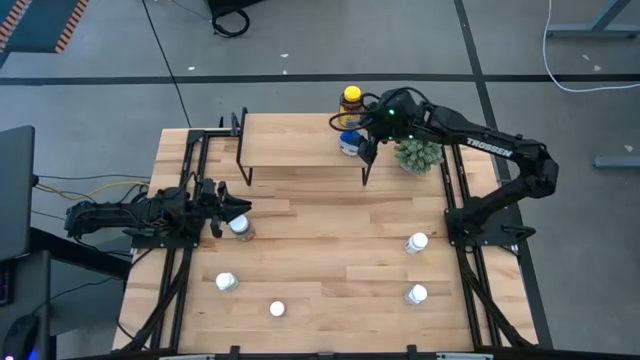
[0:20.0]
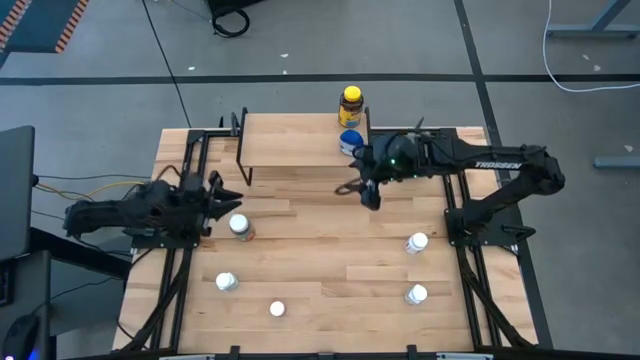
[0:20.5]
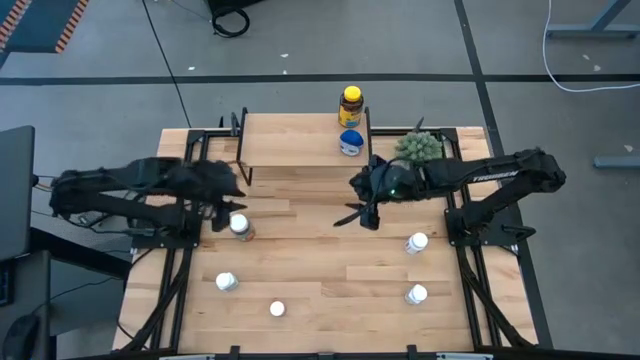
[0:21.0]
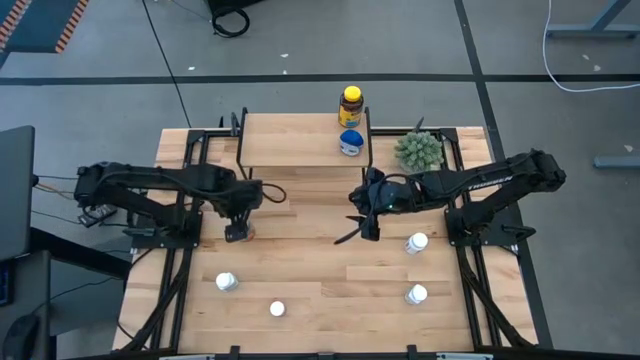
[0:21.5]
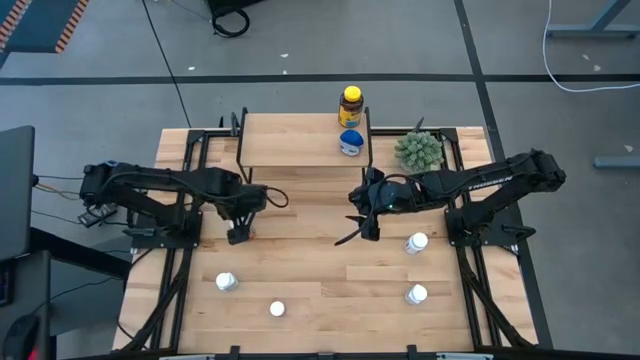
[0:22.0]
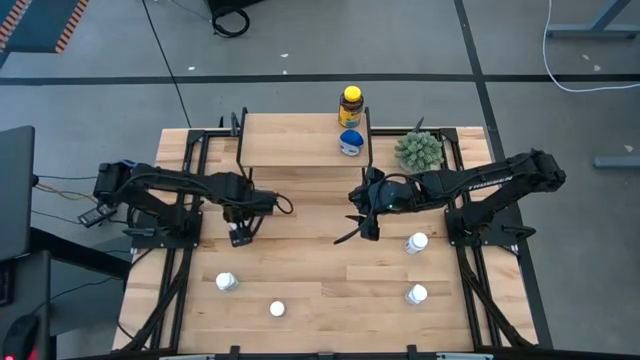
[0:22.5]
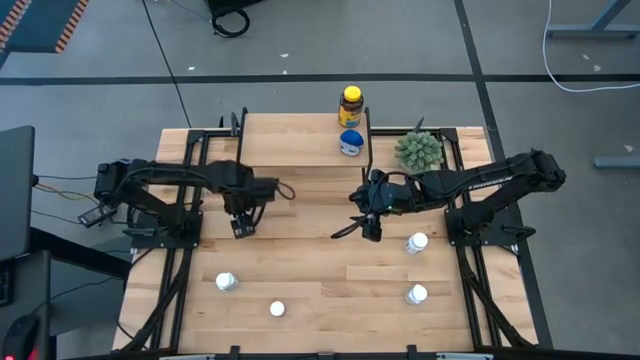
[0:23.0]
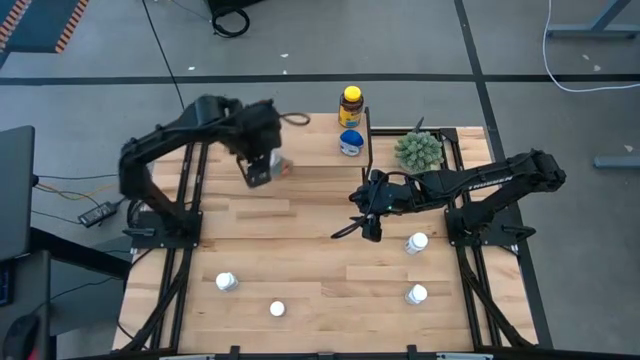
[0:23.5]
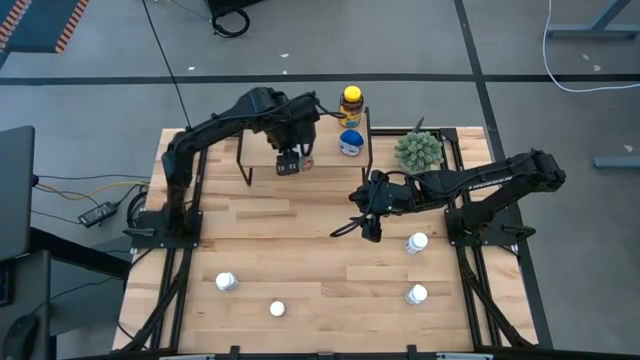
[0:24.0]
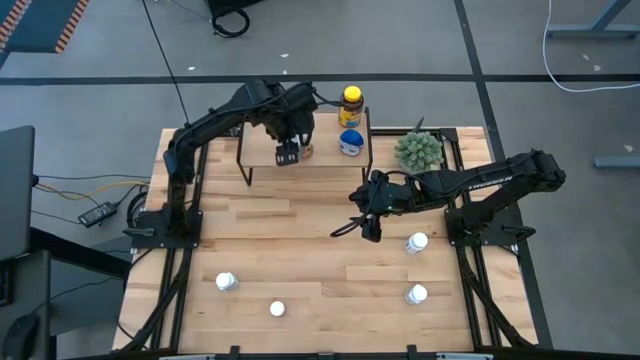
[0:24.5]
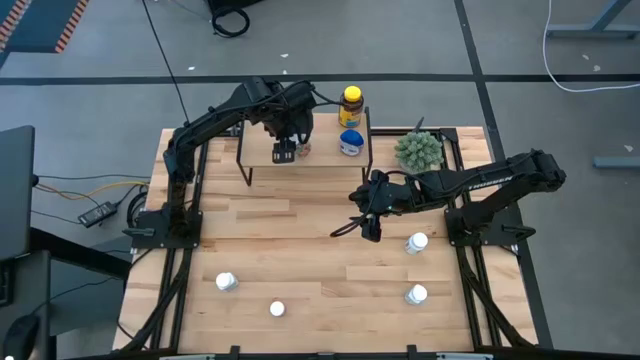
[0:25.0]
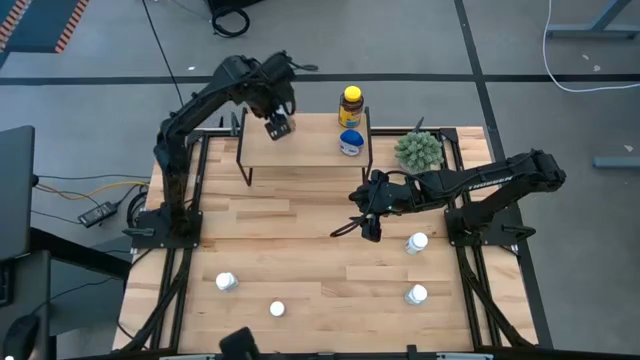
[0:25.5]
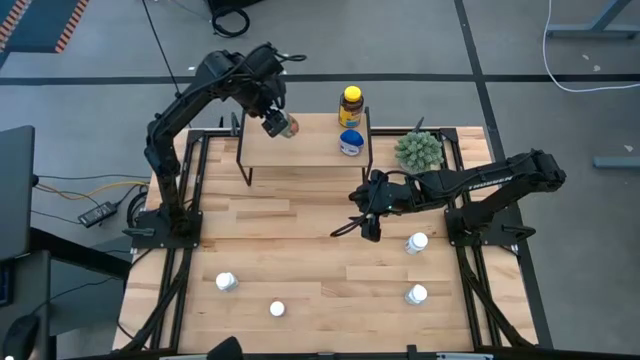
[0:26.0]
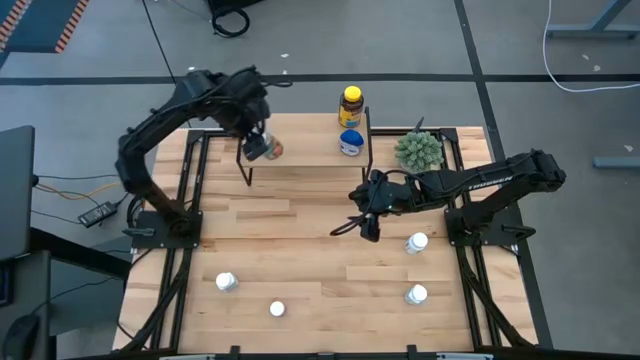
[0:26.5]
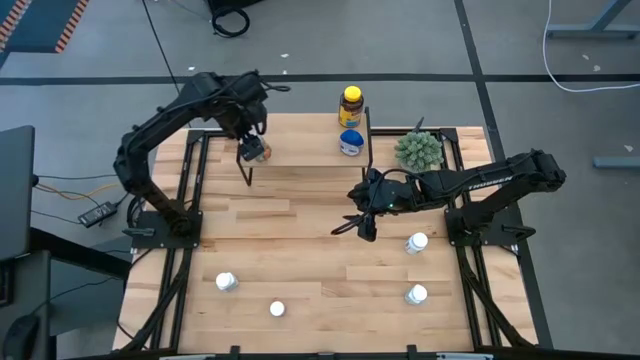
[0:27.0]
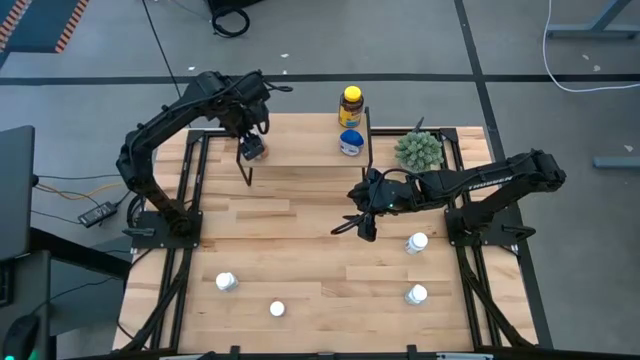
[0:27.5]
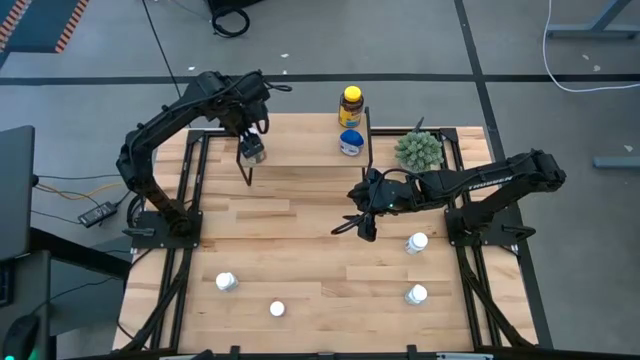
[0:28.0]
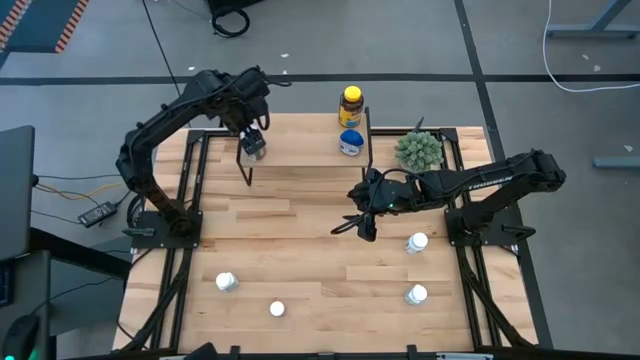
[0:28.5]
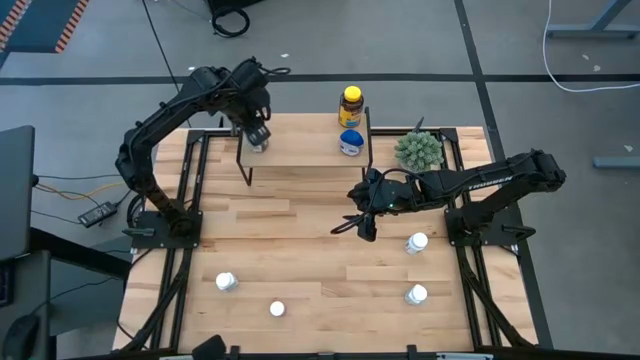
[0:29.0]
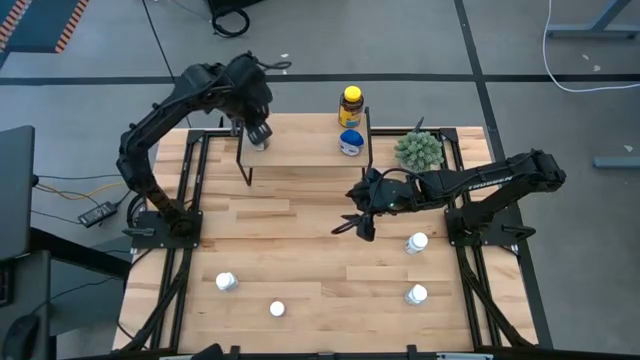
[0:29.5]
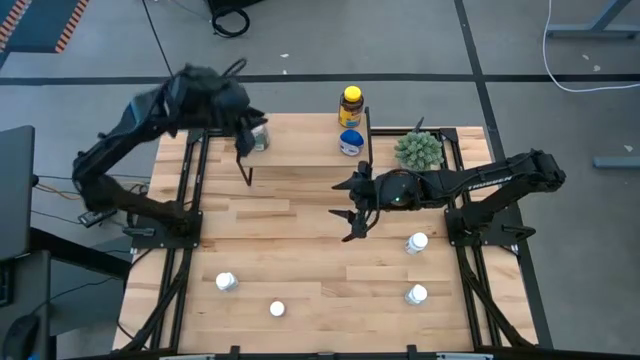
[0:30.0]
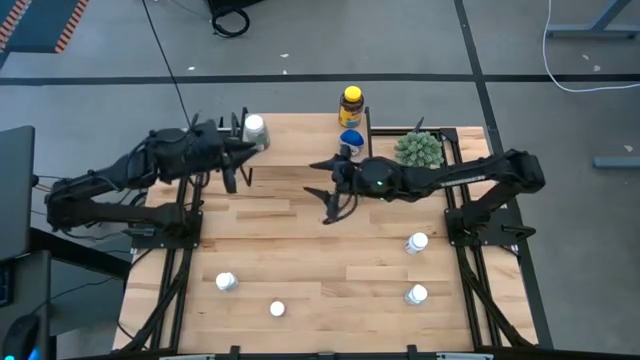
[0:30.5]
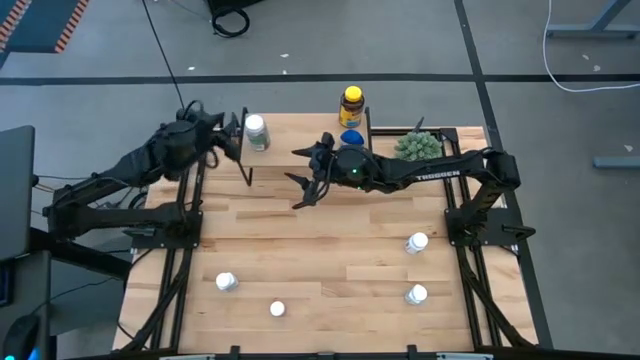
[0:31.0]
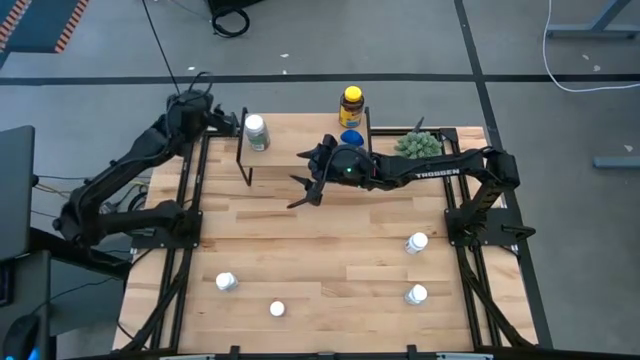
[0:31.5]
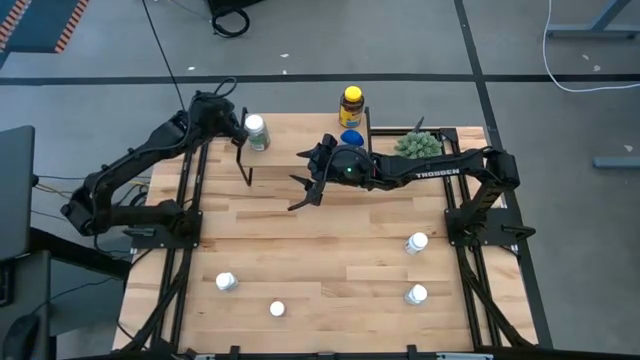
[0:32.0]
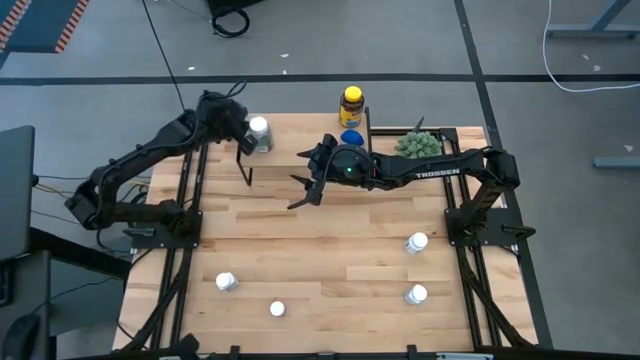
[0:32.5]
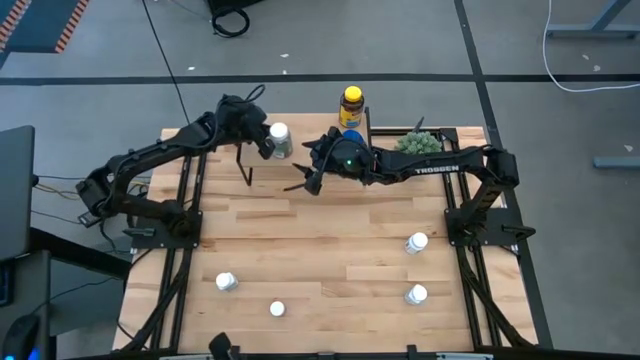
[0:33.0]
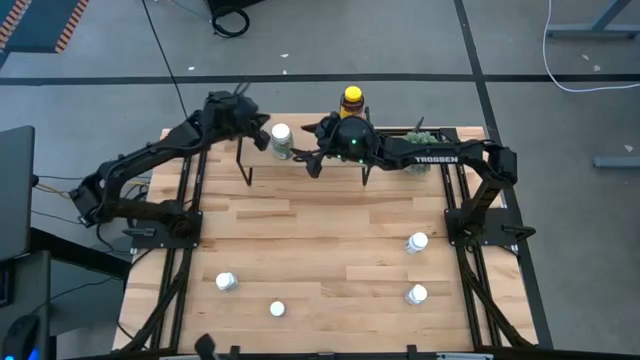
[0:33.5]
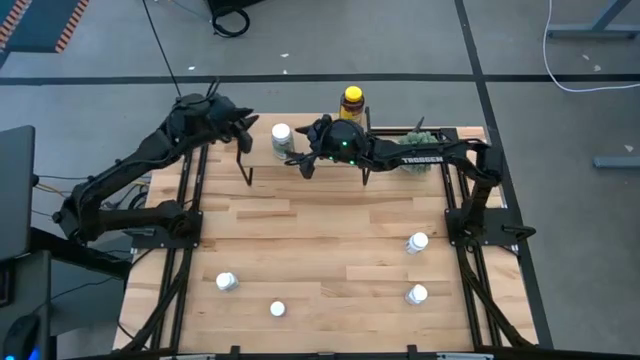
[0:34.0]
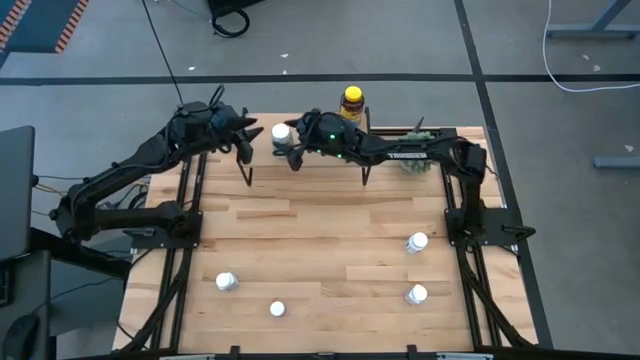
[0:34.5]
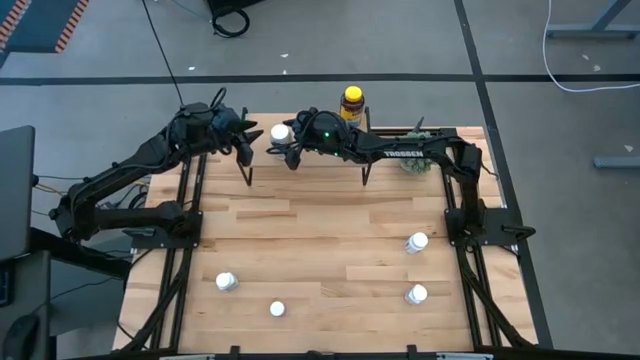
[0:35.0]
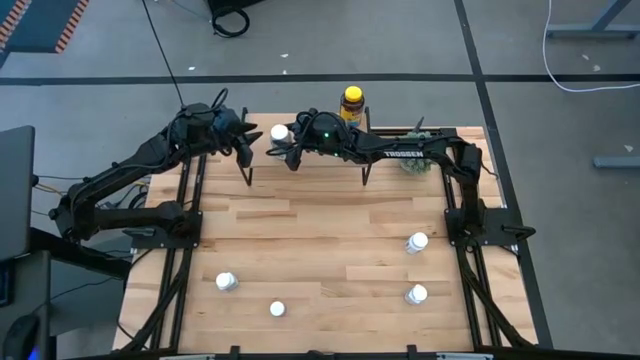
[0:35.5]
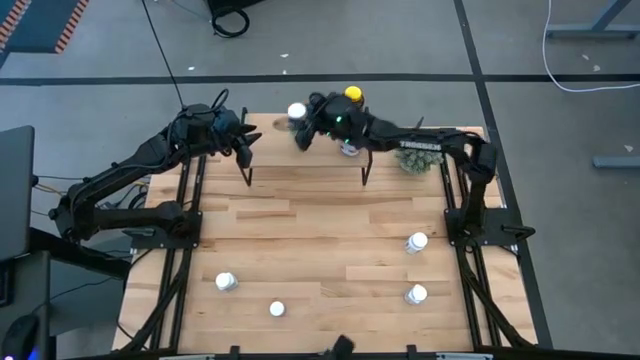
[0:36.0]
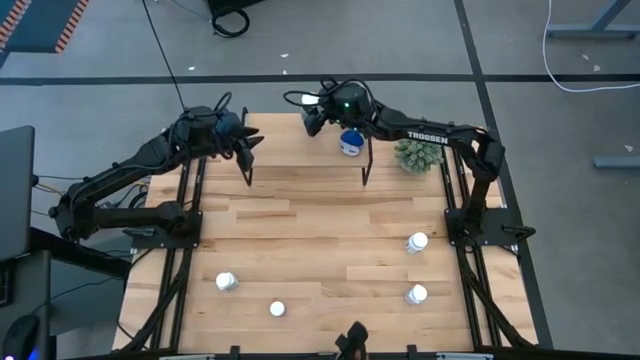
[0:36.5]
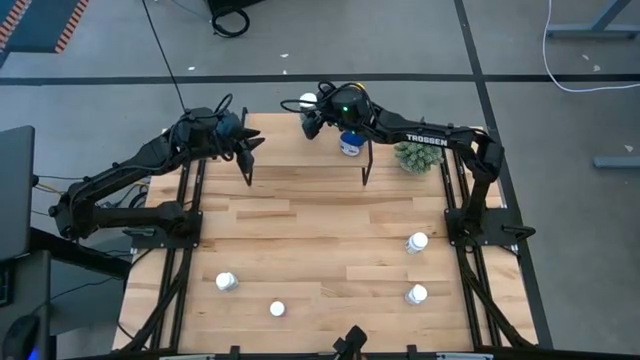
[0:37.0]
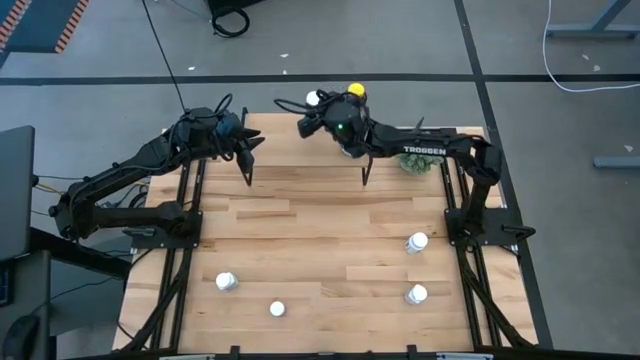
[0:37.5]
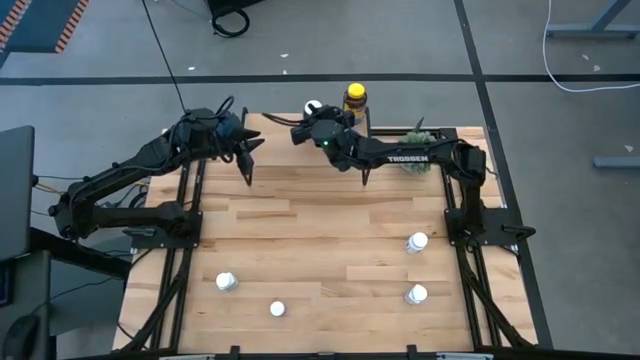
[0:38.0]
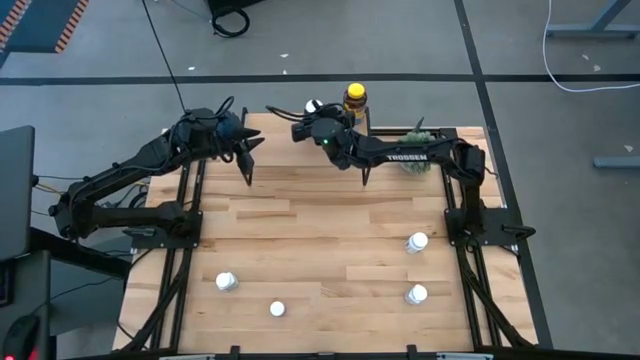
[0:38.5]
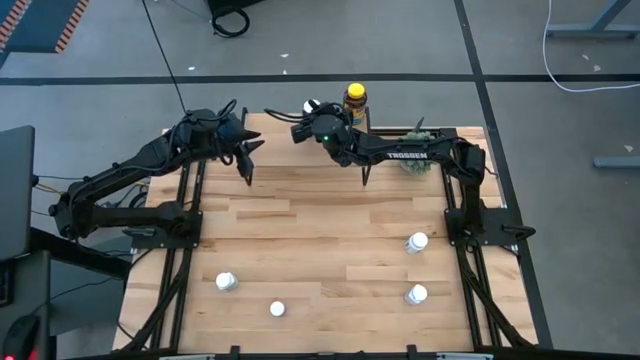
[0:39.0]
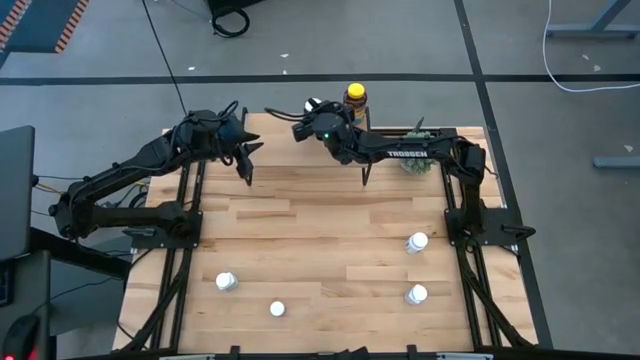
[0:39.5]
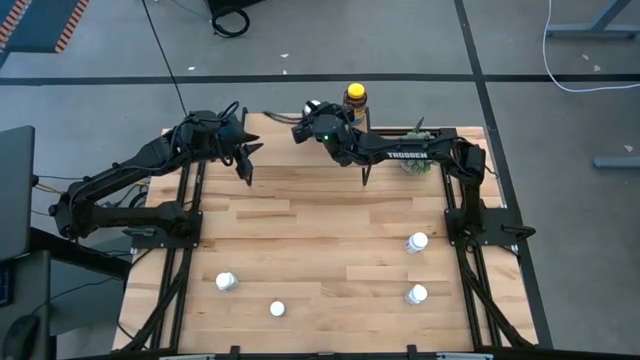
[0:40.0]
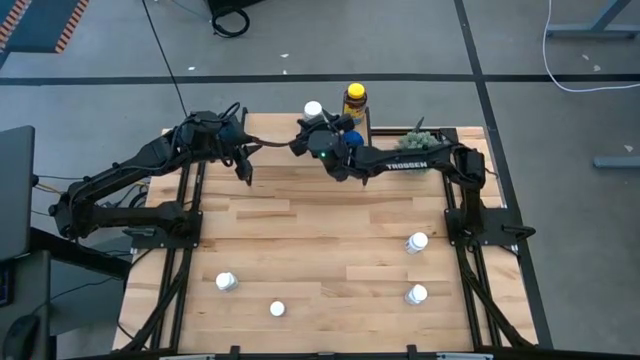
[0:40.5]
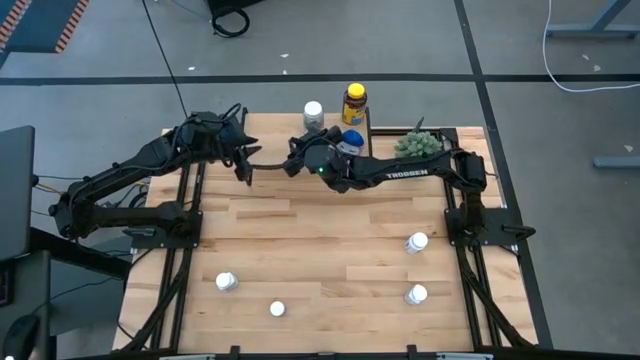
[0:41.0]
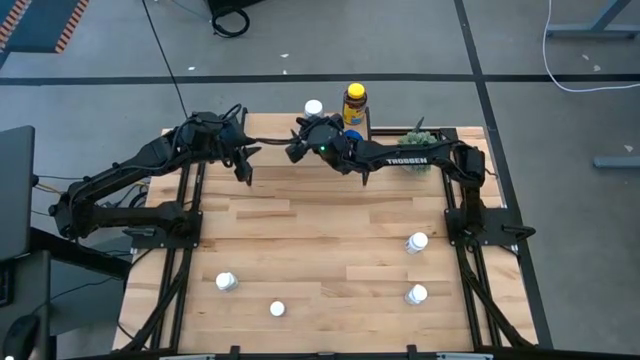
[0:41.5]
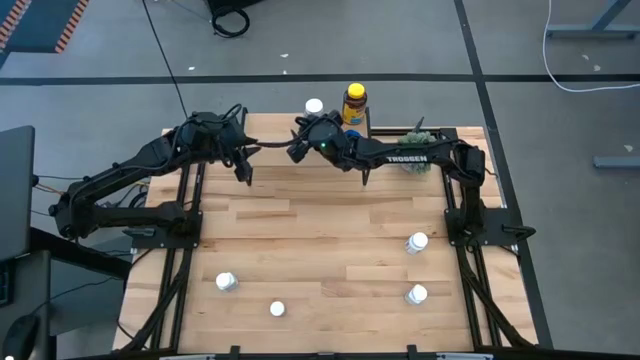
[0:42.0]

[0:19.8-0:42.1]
Task: Pick and place medicine bottles onto shelf by color
Put the green pill bottle on the shelf
